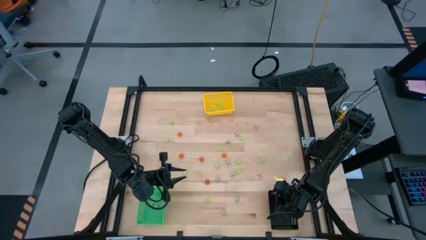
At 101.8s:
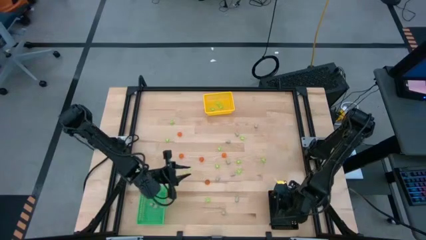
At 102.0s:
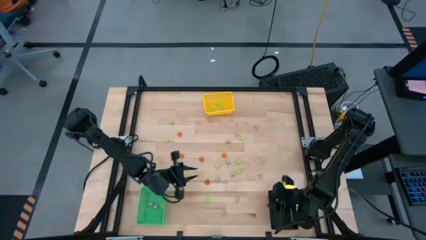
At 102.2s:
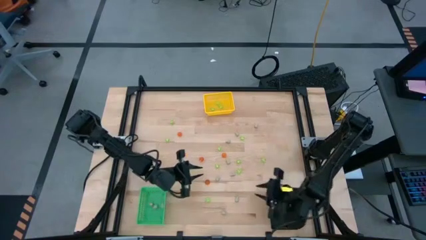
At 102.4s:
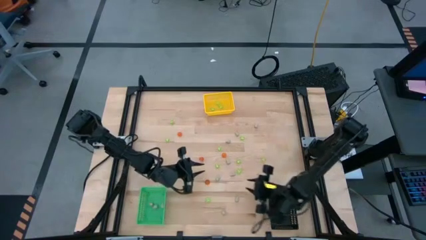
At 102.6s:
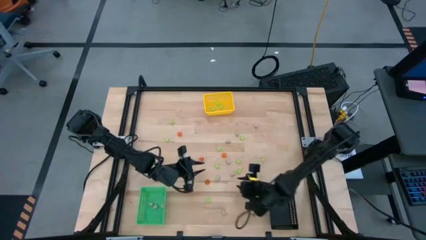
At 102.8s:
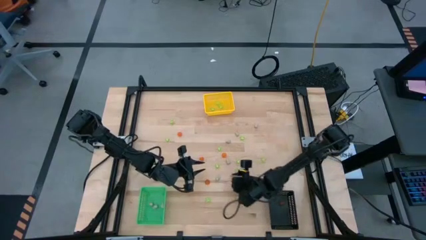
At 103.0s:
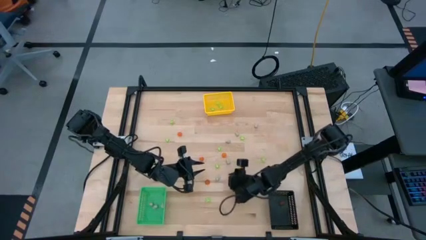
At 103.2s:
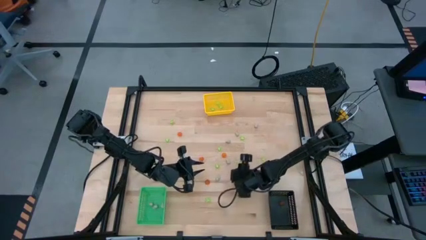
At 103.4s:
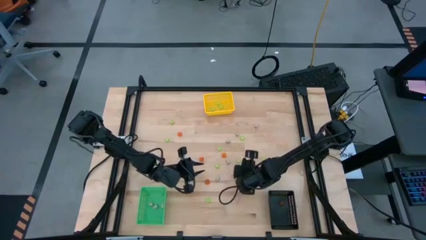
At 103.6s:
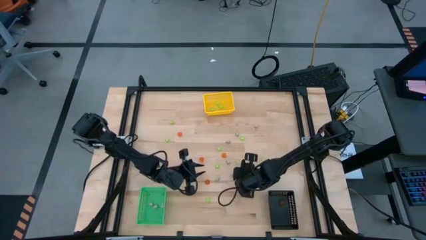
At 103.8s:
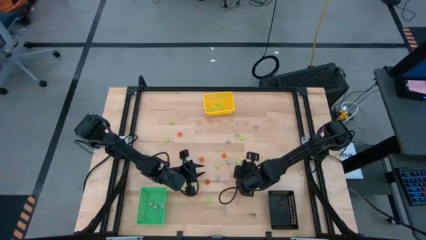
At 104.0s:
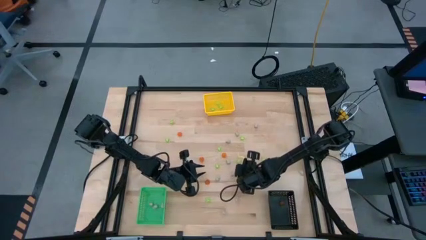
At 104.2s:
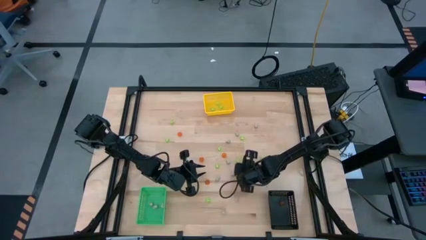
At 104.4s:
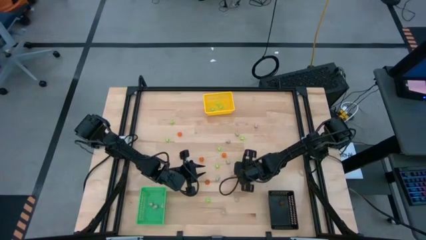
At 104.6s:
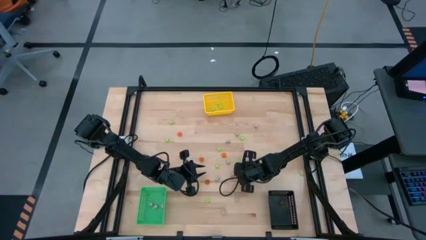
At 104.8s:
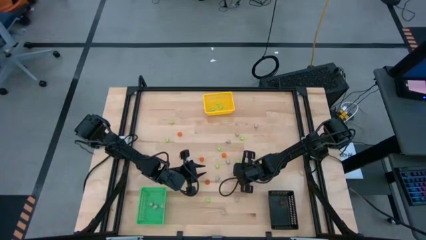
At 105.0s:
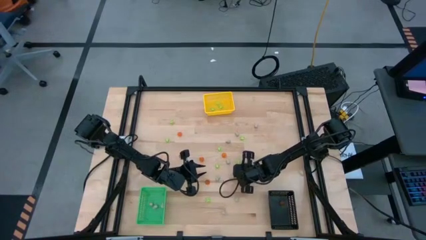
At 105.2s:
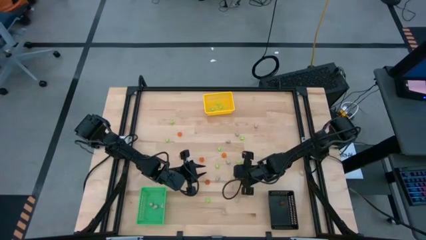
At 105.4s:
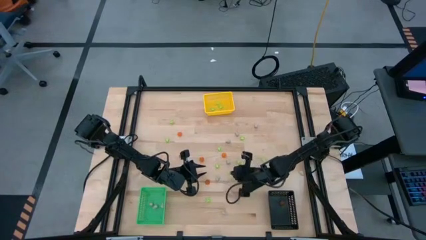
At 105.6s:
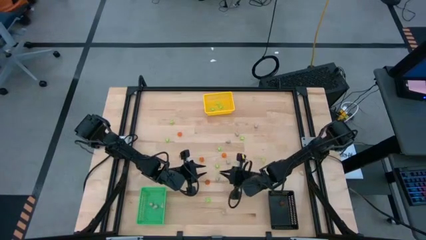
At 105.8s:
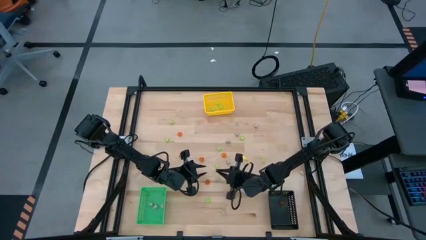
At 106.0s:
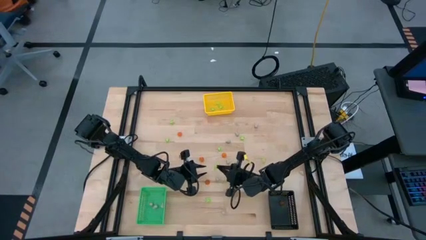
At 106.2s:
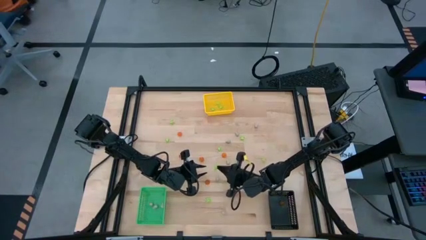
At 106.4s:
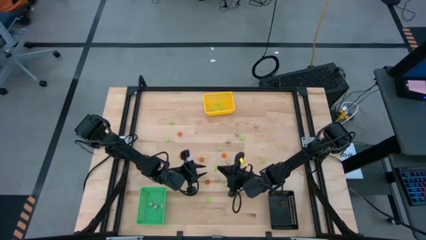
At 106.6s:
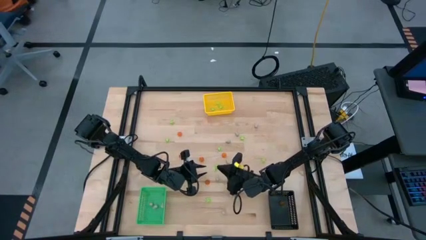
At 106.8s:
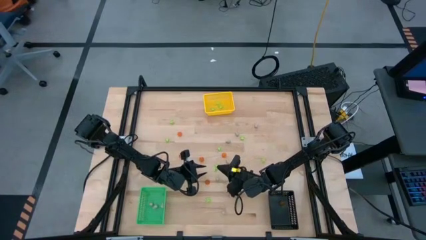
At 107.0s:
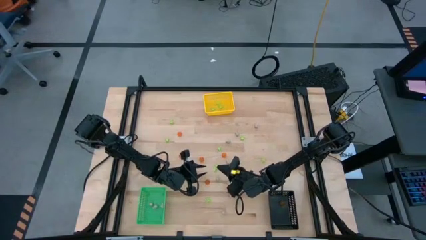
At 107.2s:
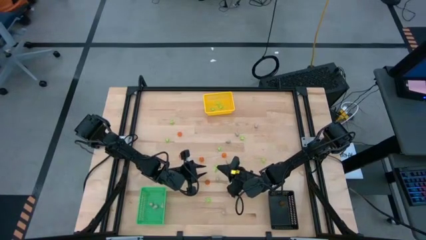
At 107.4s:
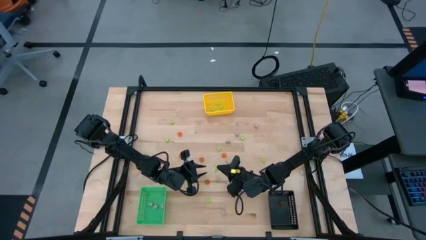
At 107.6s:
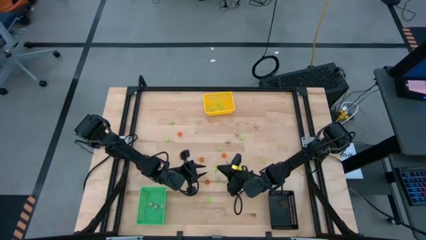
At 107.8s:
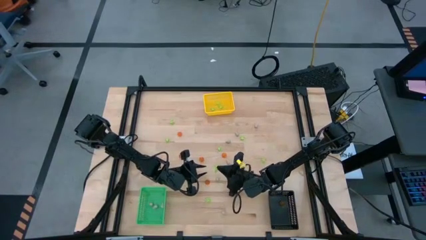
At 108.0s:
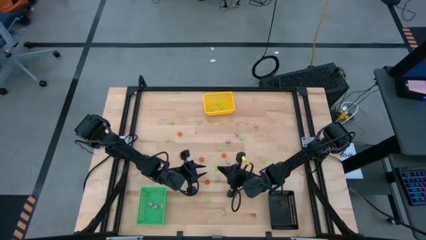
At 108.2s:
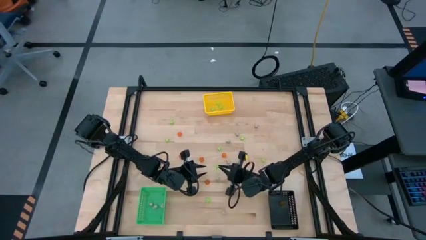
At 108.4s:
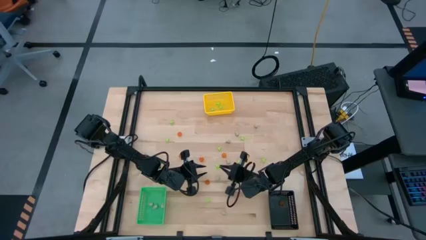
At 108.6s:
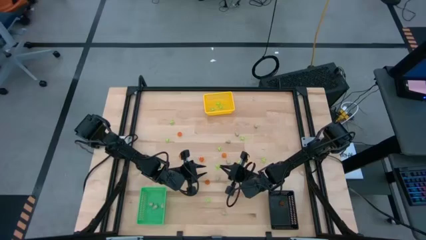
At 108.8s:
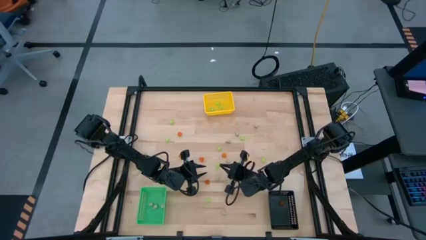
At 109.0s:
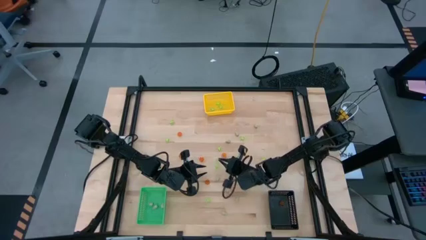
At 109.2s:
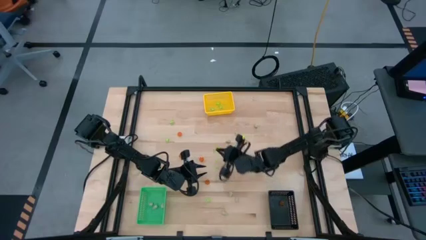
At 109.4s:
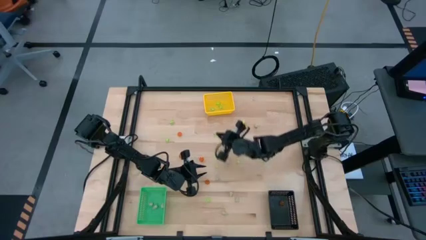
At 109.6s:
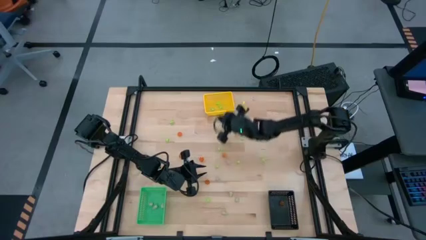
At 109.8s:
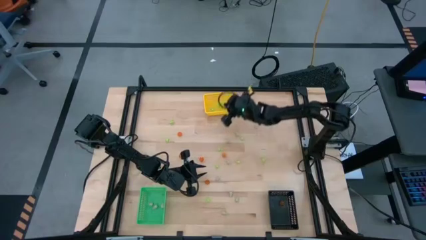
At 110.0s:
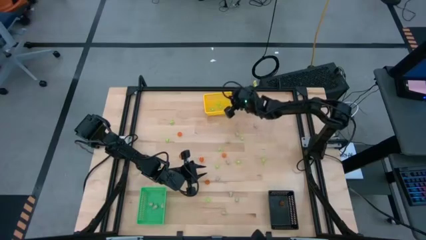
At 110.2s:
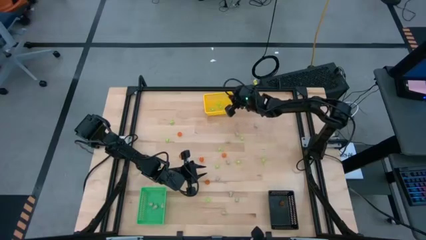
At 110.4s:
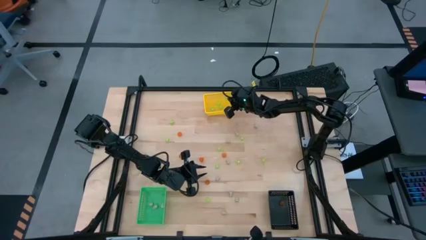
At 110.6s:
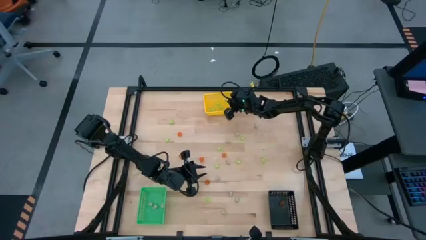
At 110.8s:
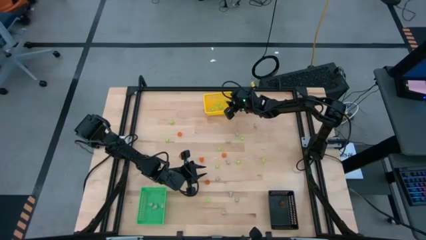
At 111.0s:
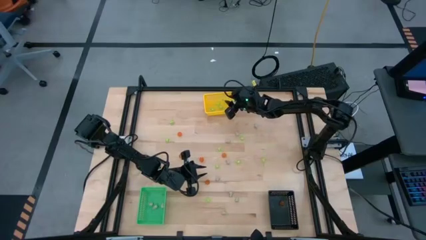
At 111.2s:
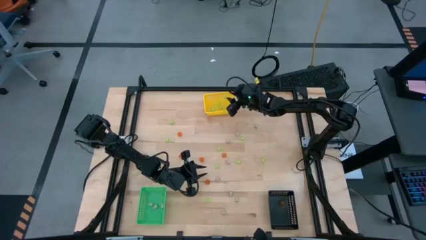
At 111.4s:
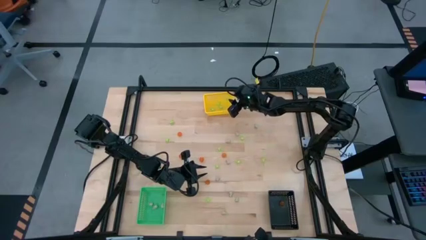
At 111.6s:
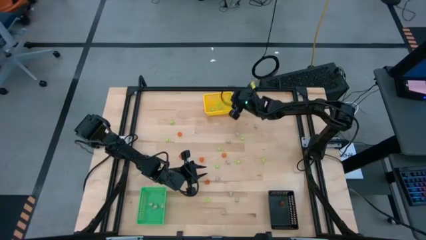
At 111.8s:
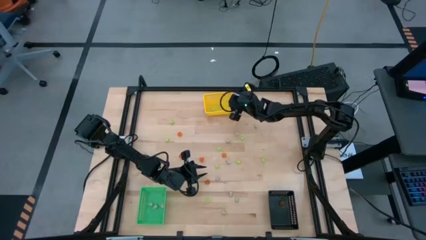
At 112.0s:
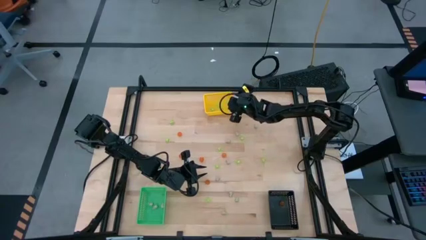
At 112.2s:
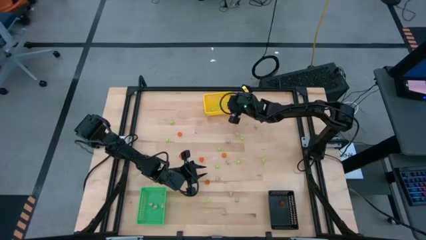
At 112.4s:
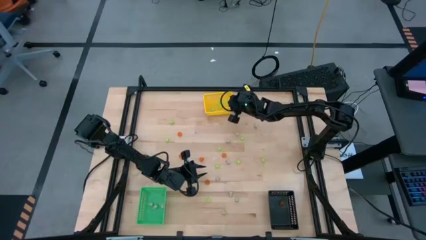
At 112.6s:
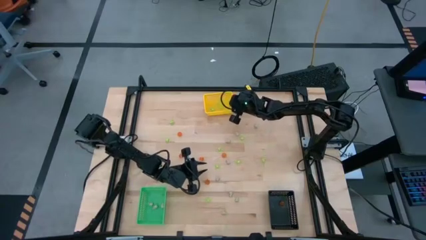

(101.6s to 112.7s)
Task: Sort Halloween decoration
Put the green spider toy into the yellow bin

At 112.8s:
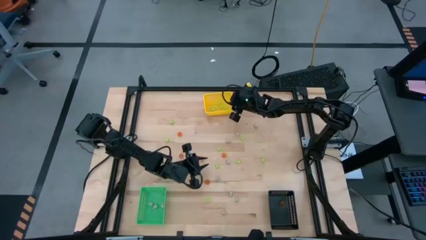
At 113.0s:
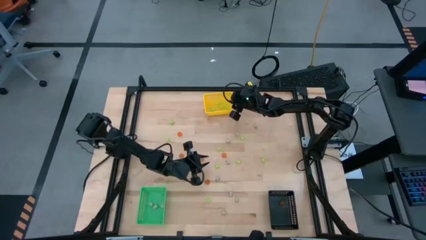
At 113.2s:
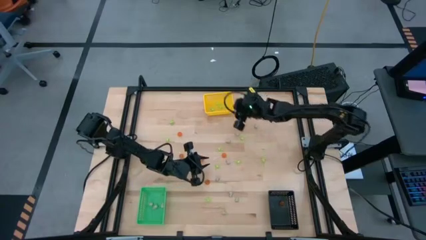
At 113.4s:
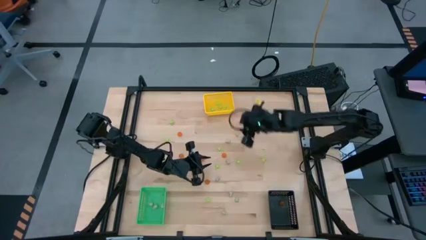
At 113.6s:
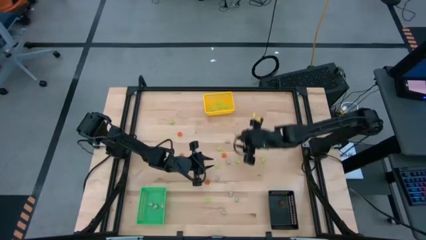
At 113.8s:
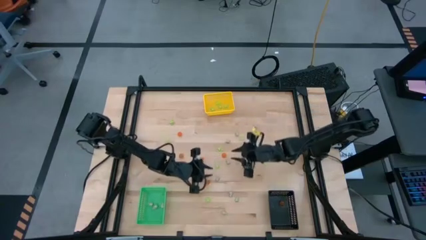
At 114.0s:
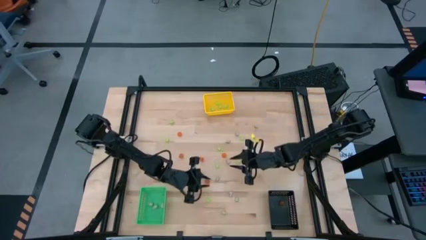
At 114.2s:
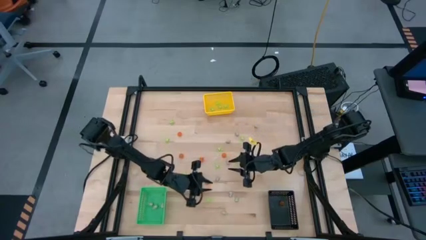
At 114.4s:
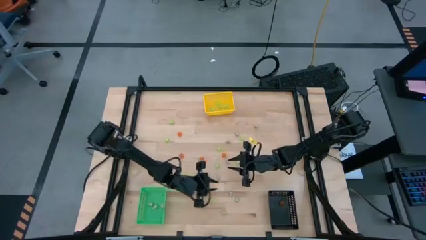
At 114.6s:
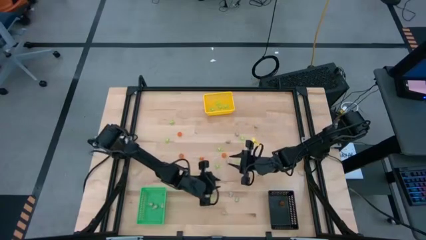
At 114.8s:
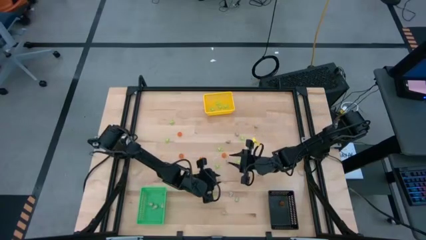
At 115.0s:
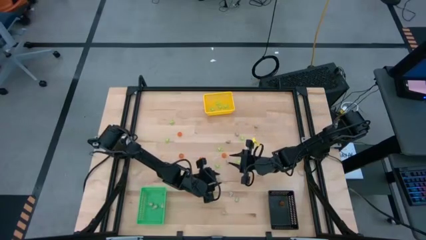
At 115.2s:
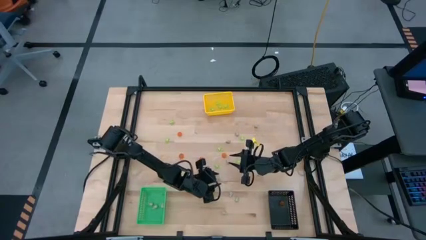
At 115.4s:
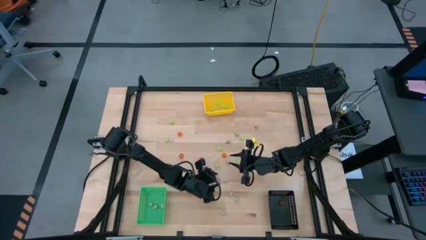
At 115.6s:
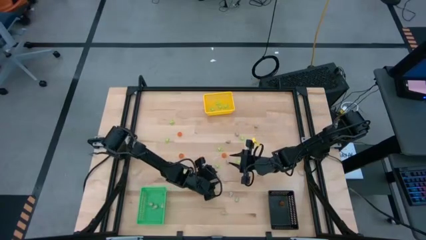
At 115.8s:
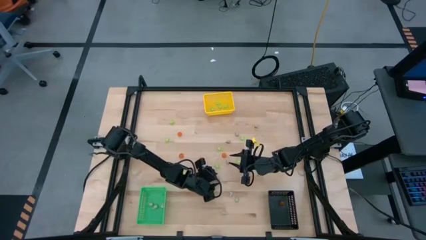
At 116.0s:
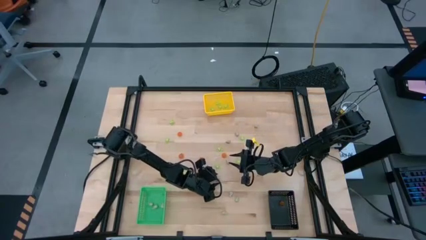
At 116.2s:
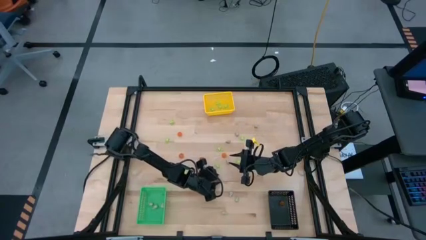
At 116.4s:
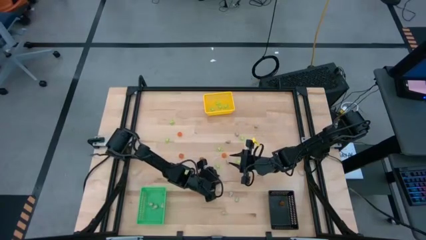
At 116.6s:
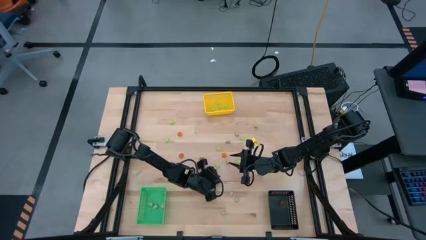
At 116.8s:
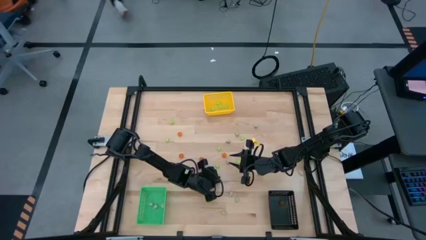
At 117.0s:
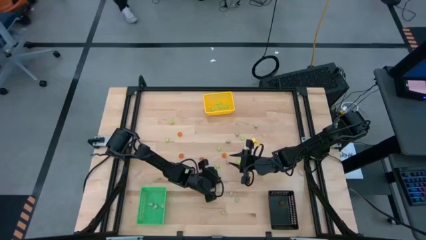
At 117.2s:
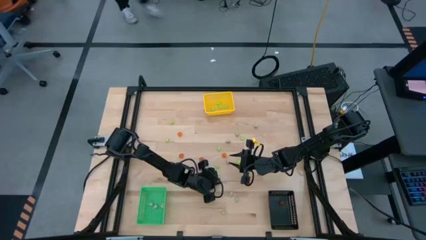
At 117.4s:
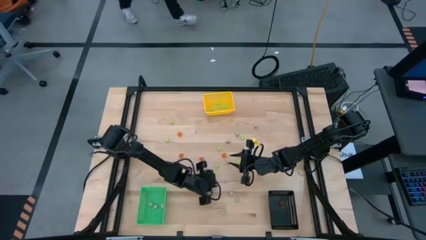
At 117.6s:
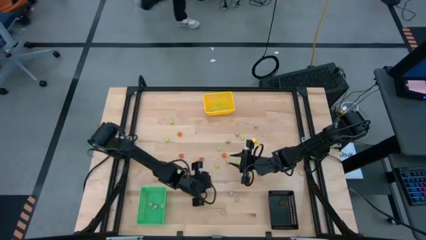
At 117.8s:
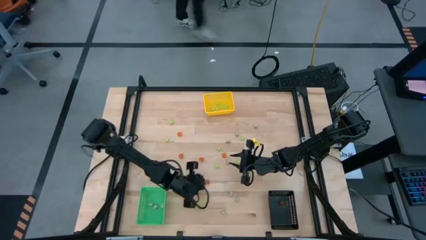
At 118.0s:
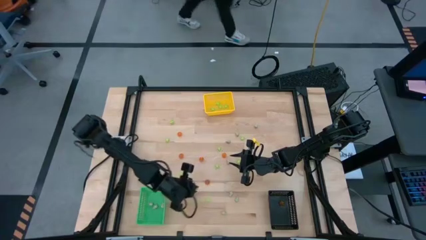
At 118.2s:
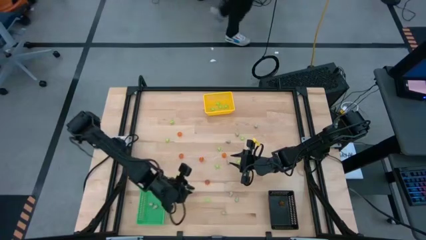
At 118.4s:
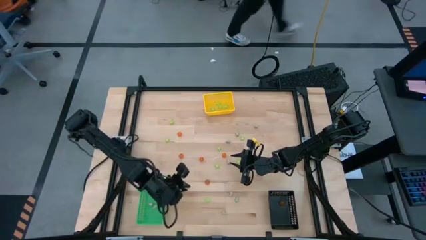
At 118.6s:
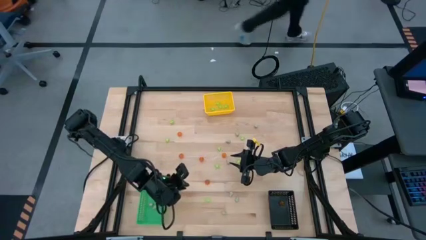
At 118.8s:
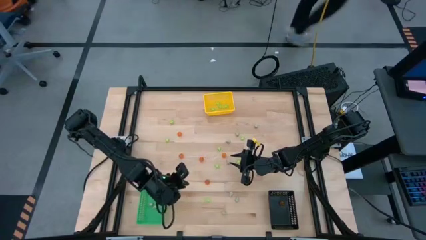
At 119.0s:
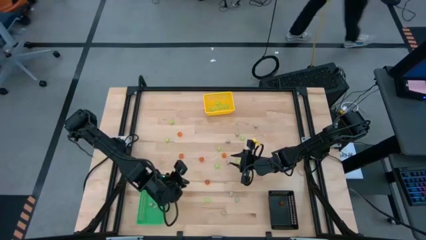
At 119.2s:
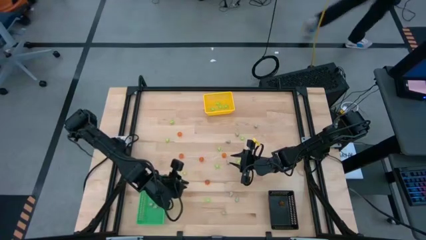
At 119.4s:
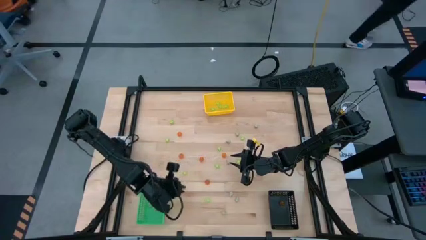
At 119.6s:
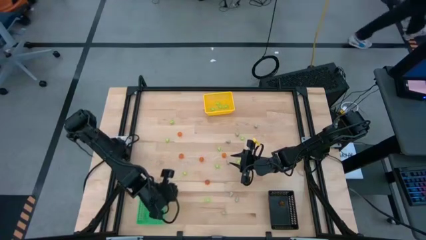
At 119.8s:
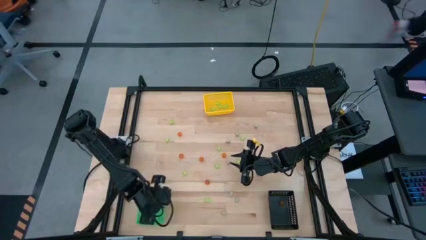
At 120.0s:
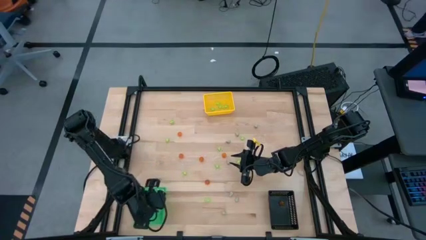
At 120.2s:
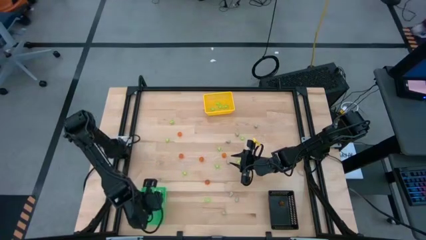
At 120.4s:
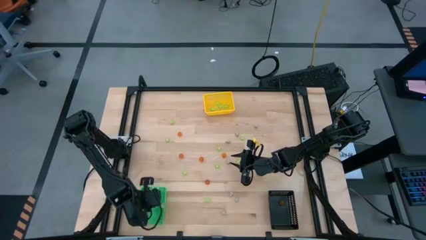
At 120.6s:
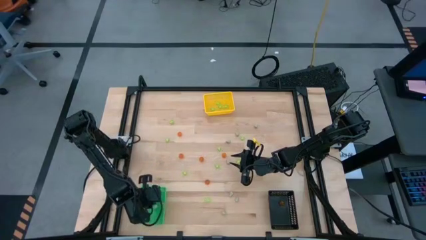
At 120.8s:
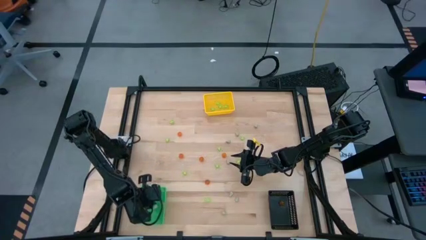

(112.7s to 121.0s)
Put the white skull toy into the green bin
